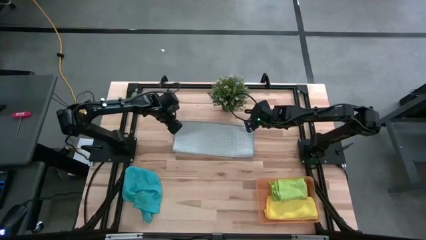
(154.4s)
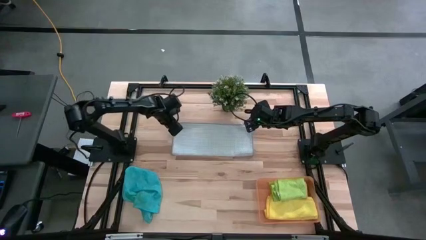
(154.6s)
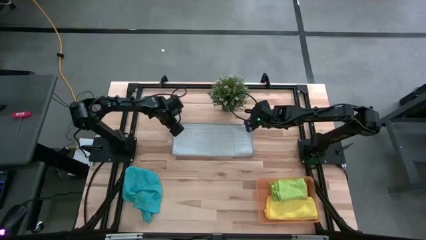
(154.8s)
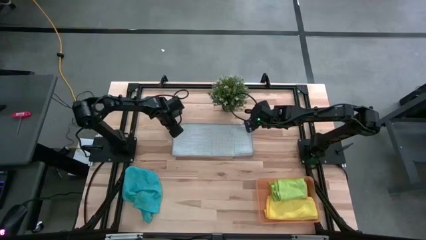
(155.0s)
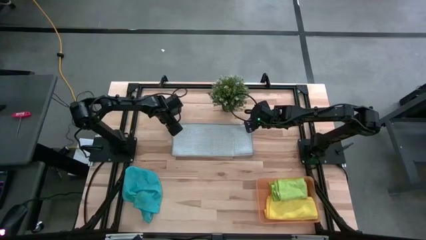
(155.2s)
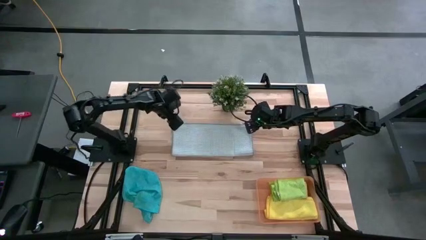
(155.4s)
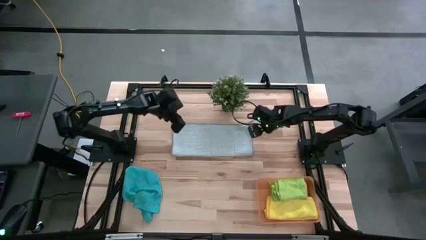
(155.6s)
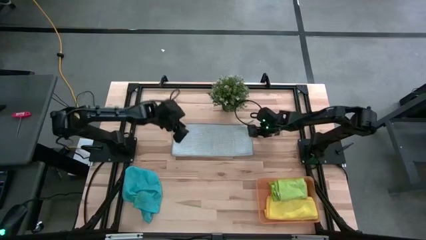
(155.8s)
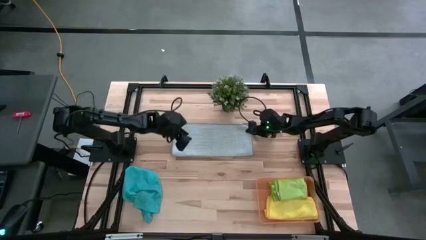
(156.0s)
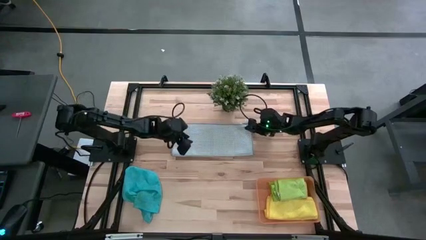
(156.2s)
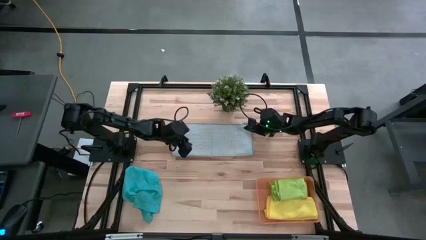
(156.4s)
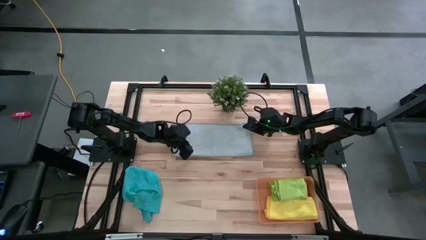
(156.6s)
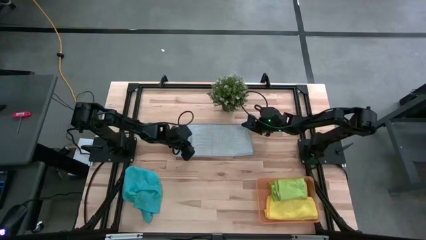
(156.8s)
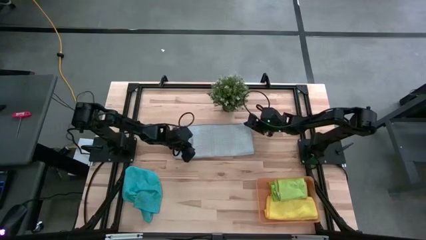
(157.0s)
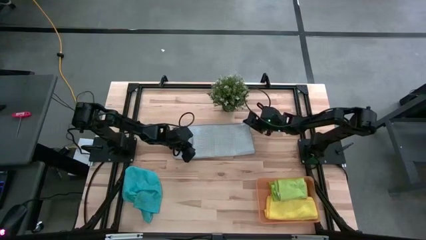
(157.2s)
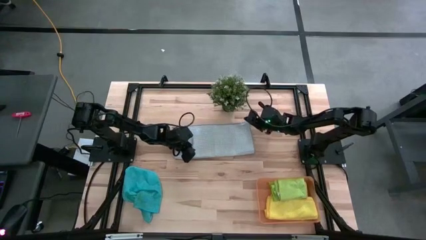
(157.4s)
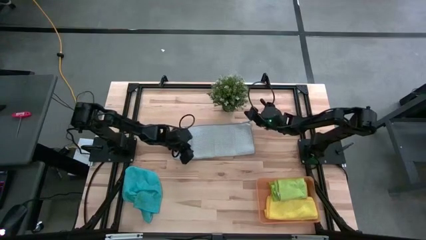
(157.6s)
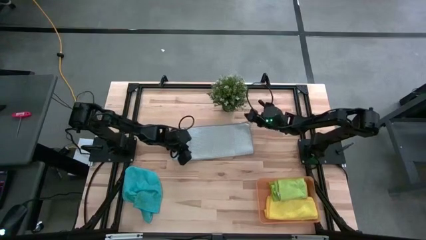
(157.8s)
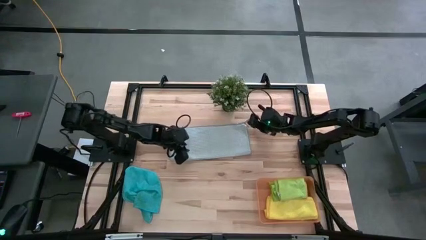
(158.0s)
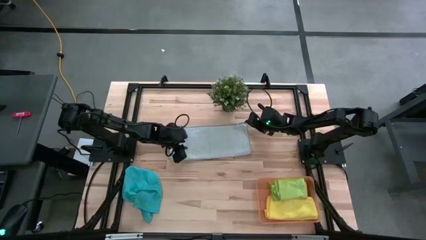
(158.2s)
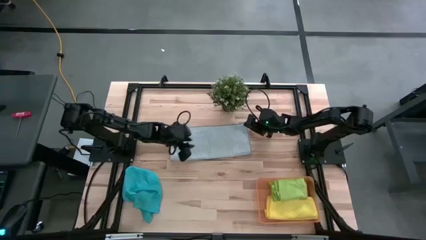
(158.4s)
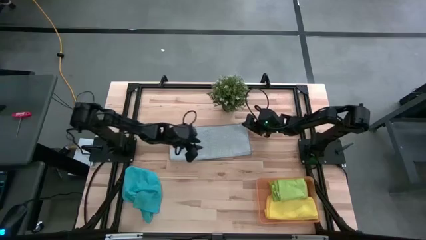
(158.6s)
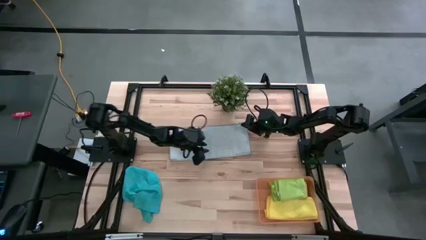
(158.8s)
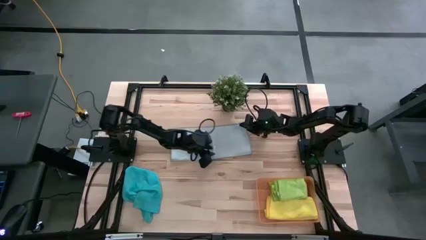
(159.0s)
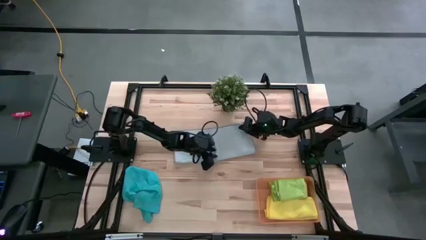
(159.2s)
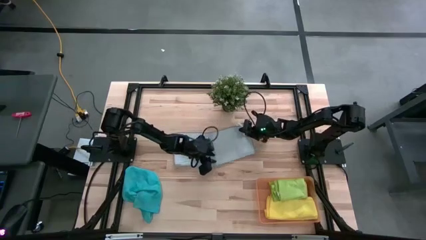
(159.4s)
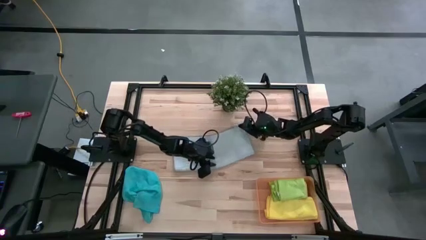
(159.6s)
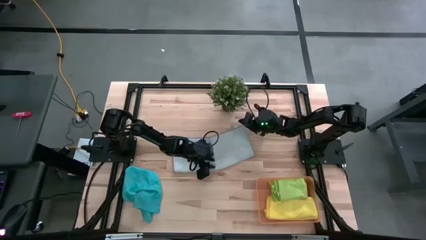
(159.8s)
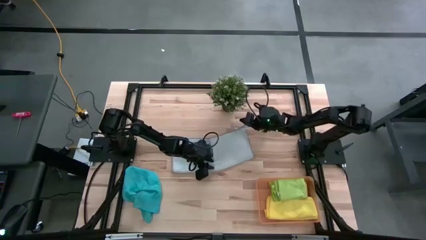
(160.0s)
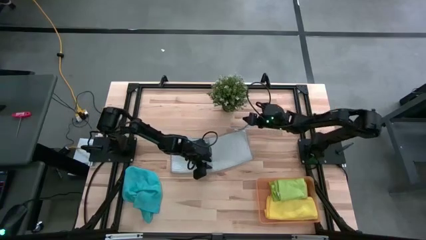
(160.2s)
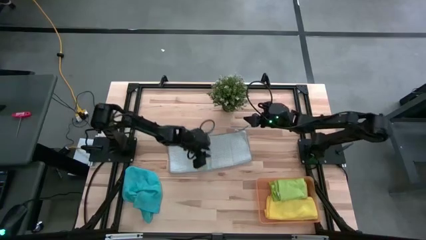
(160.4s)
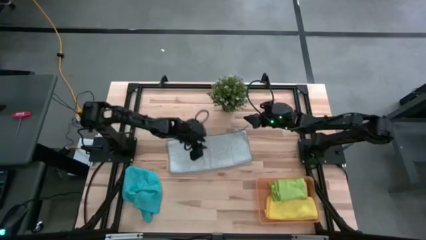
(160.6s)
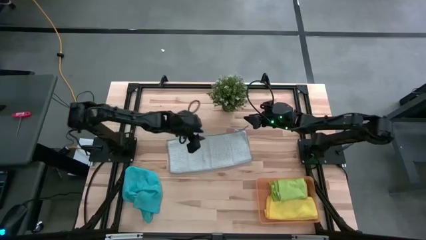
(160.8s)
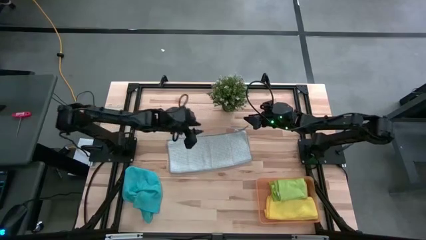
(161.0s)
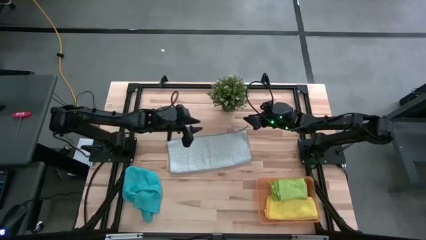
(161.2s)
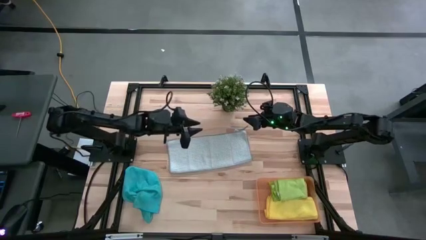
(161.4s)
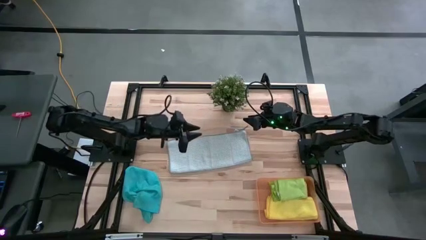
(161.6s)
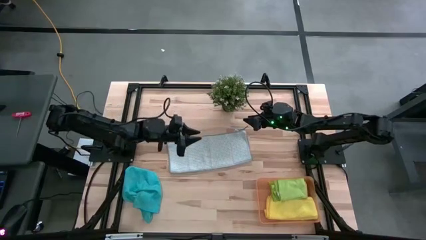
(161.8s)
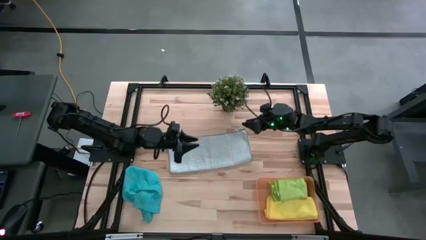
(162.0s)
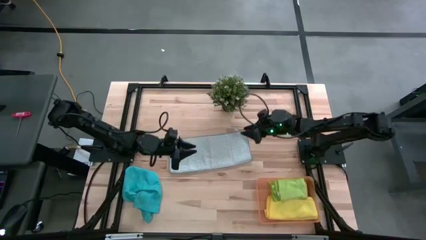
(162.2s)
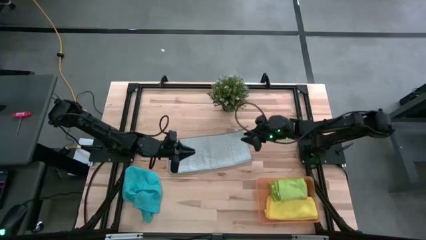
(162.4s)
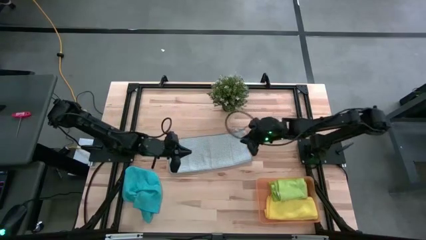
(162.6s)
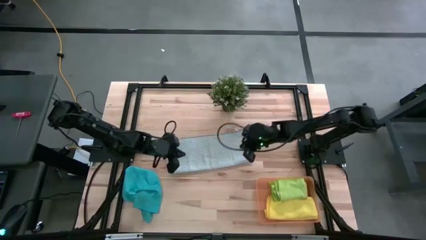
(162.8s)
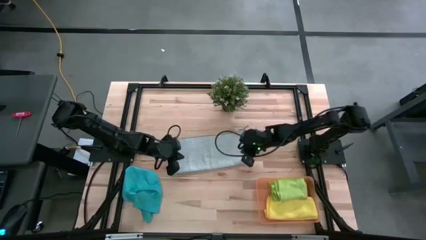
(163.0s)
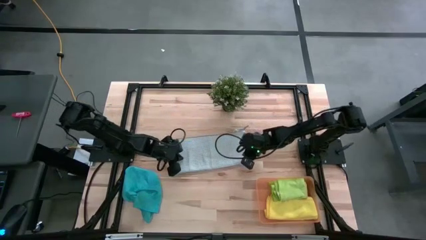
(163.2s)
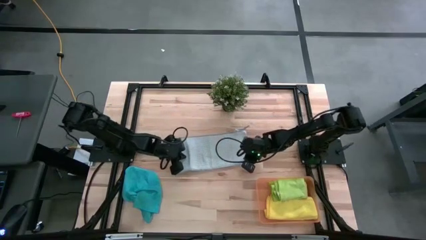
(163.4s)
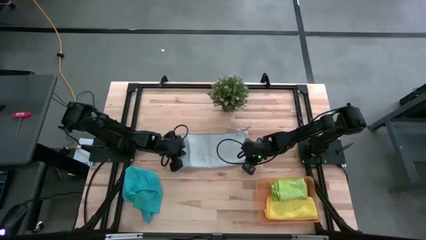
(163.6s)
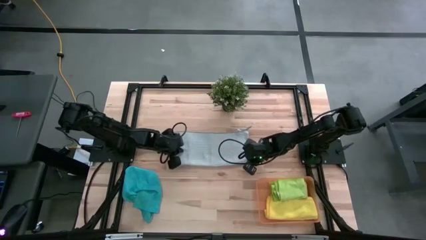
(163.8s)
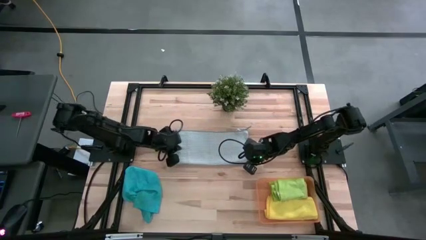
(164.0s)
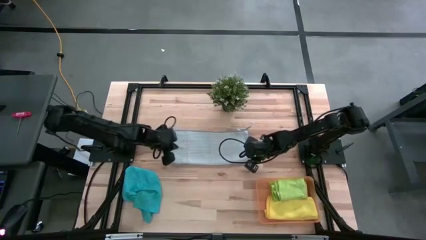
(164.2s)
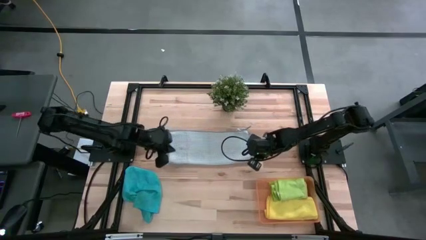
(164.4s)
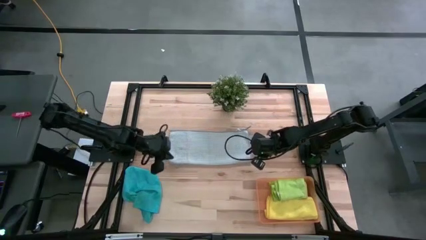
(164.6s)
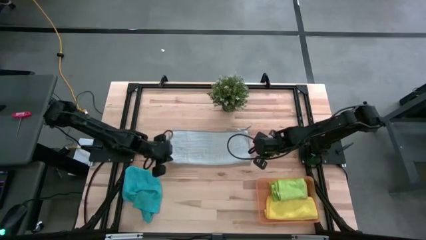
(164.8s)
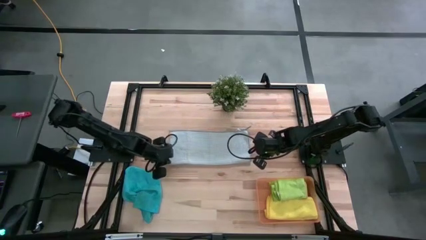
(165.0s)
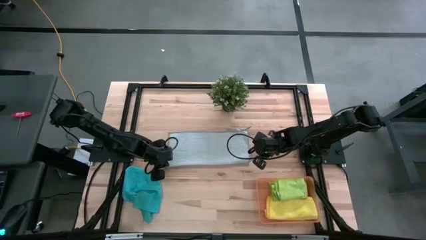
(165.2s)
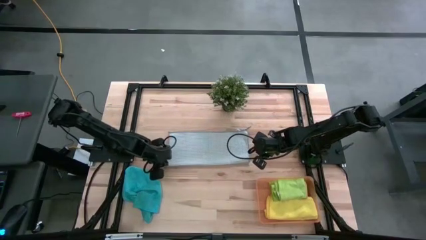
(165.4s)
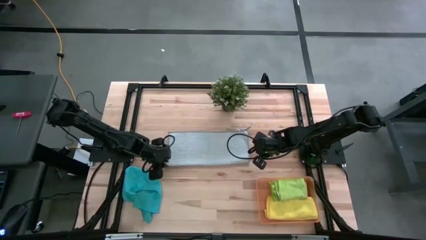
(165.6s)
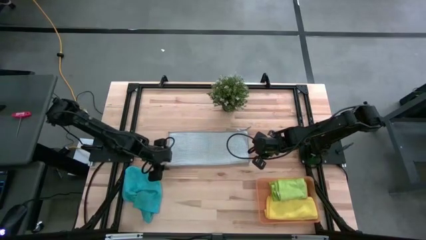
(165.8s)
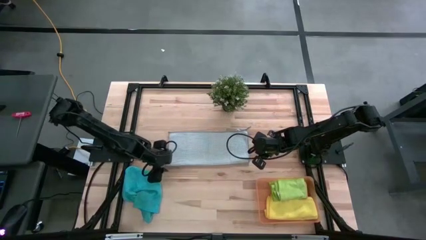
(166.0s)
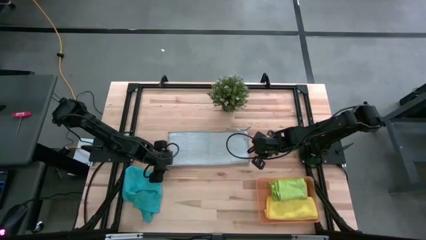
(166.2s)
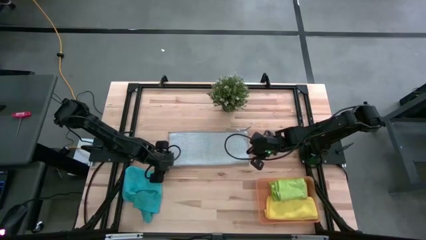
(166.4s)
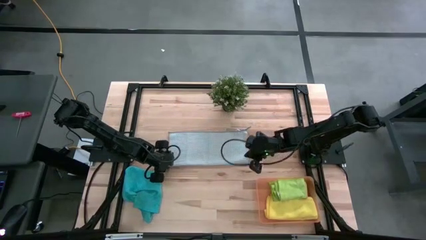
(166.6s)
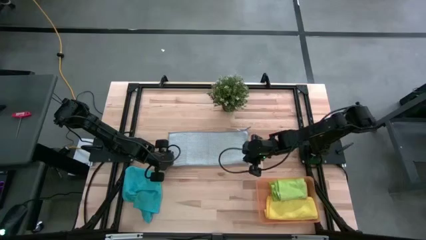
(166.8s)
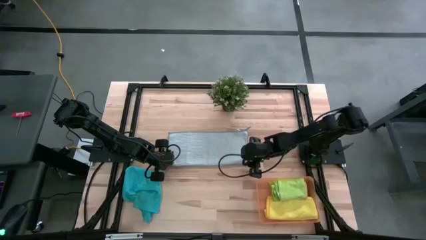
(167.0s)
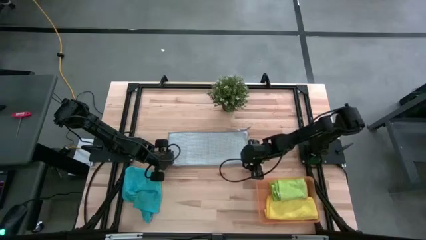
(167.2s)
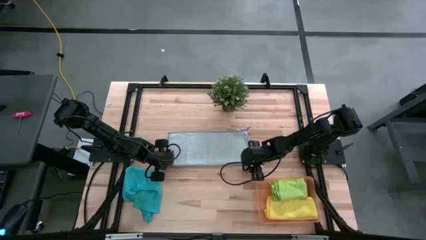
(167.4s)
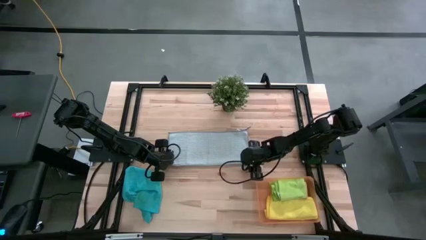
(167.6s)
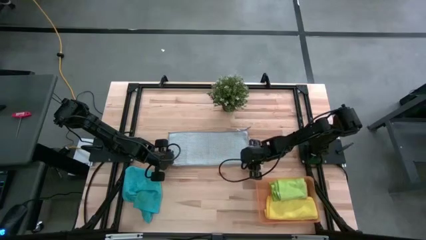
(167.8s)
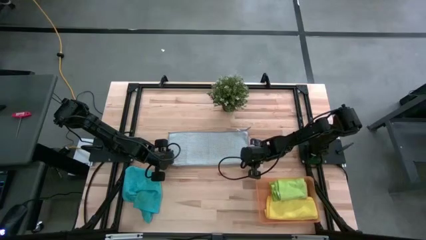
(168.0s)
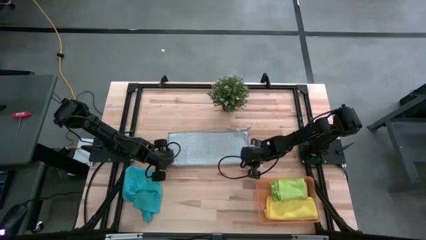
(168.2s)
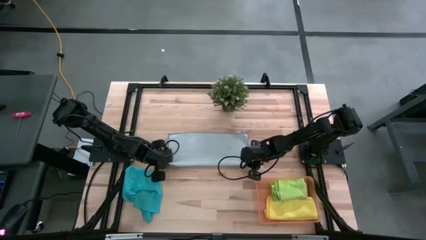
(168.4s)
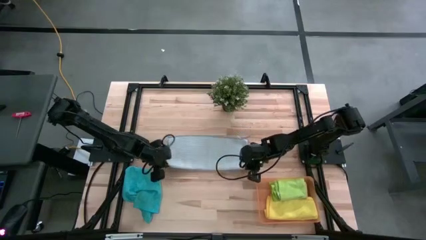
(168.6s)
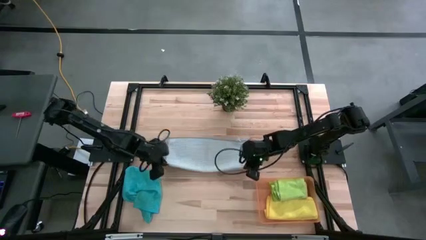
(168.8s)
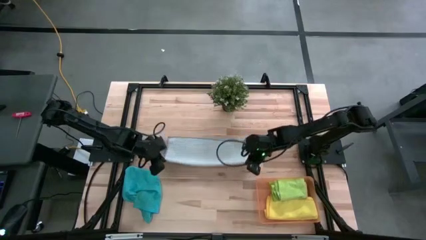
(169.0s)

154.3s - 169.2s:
Task: Fold microfiber towels
Fold the gray microfiber towel

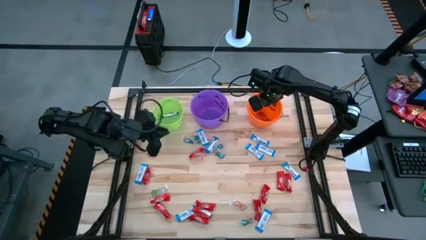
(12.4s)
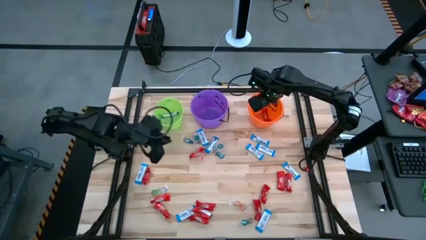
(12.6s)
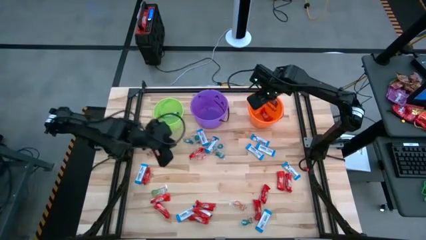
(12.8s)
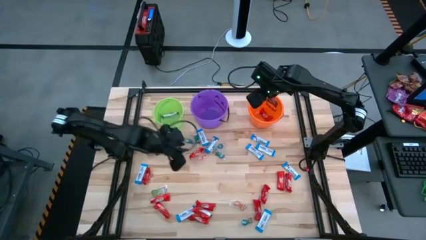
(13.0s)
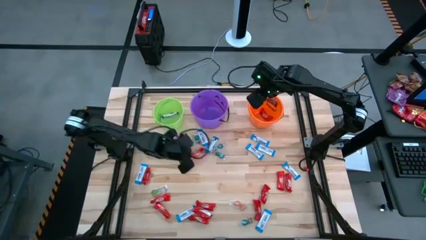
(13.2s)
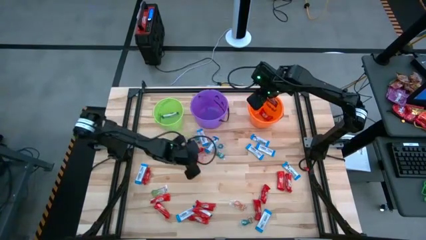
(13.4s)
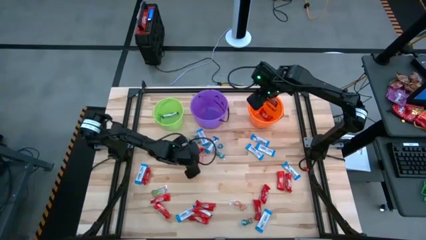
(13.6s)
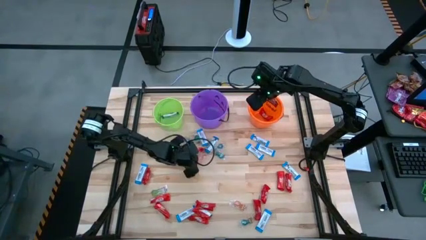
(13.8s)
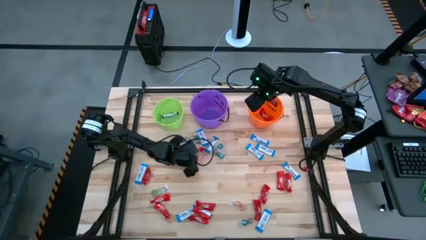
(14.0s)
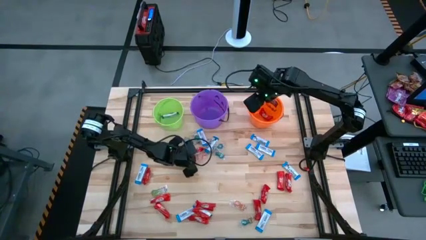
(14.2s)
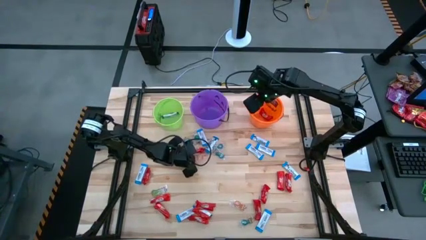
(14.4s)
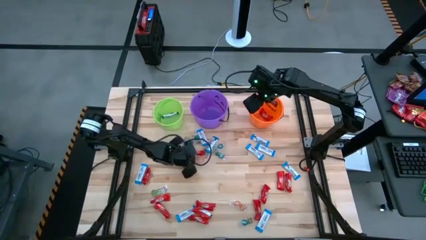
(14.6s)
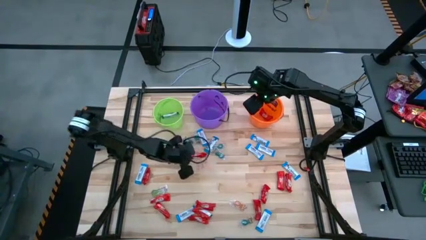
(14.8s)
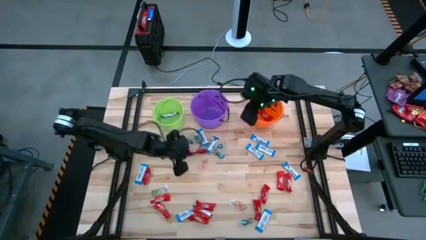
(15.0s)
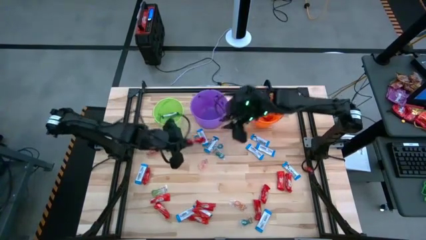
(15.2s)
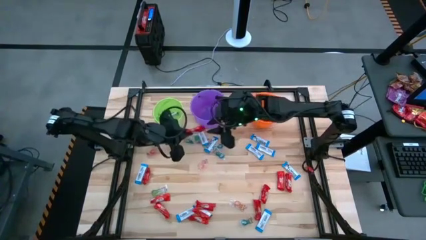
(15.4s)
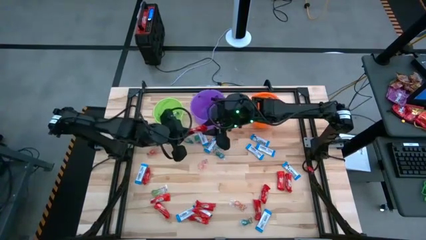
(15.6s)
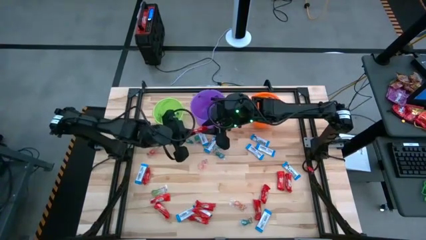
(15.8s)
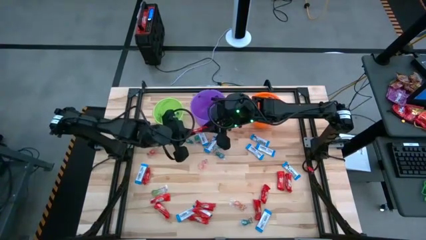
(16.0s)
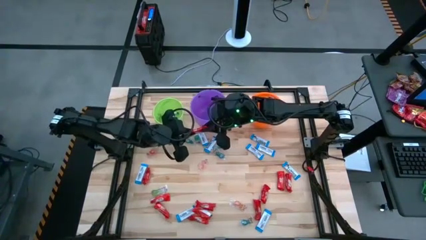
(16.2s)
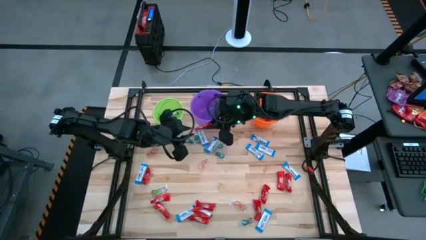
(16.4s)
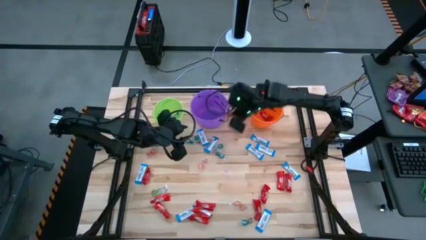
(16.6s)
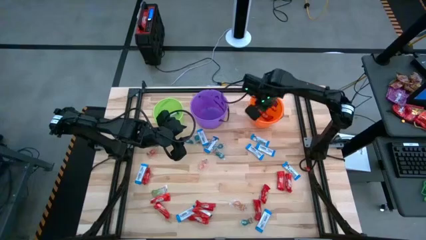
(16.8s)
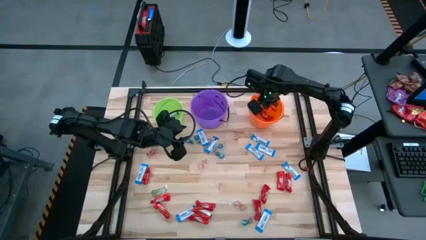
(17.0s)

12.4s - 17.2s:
Task: Sort candy by brand, put in halloween buckets
Put the red chocolate into the orange bucket
